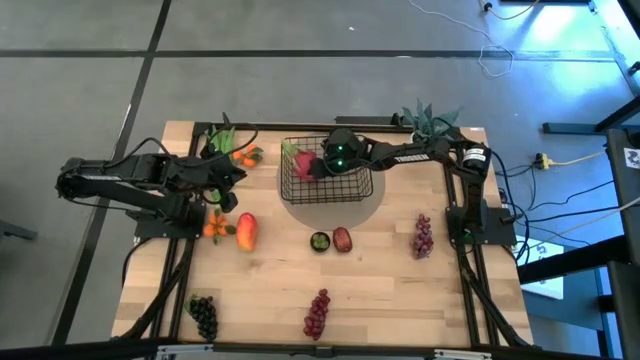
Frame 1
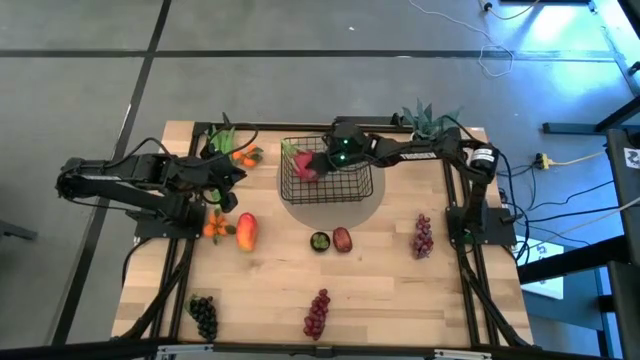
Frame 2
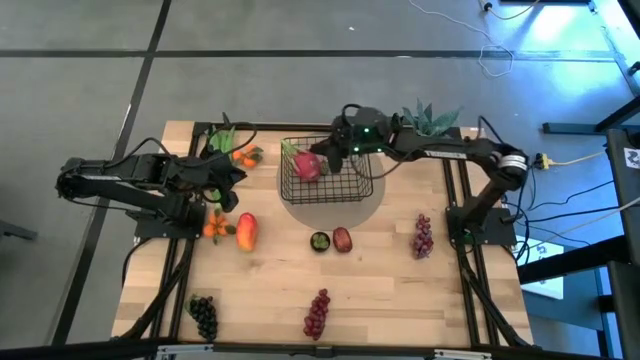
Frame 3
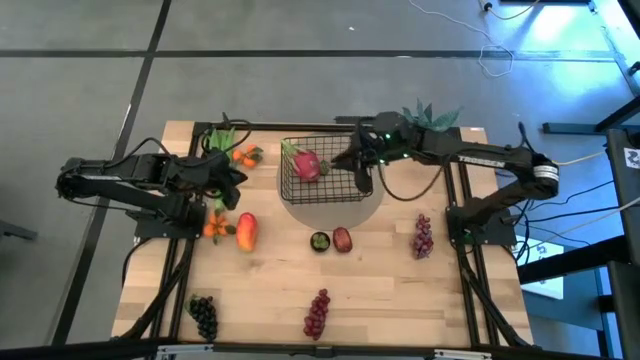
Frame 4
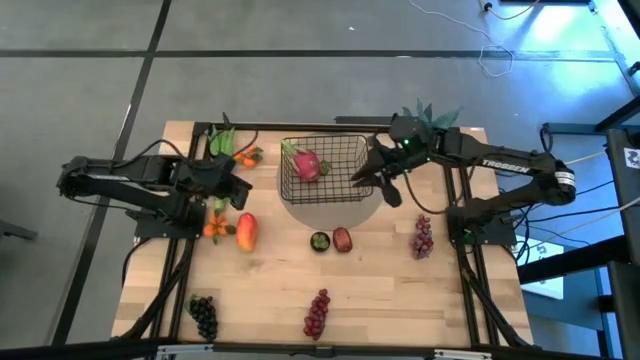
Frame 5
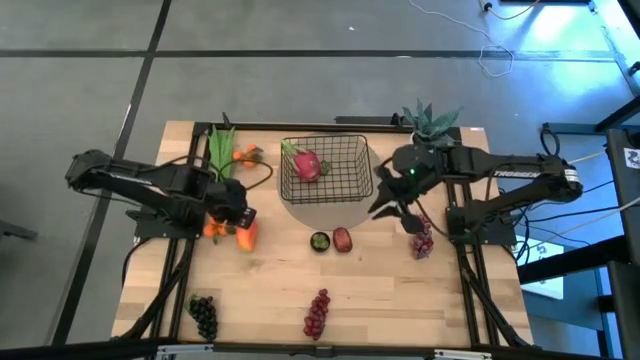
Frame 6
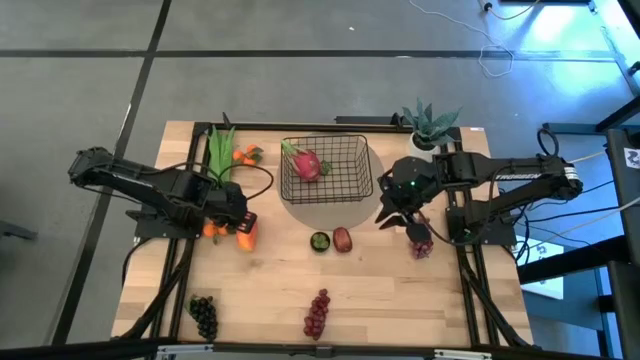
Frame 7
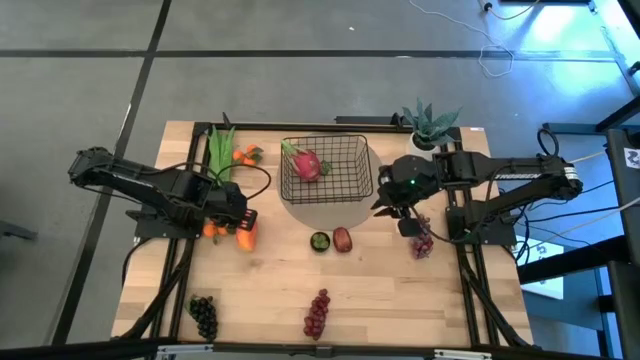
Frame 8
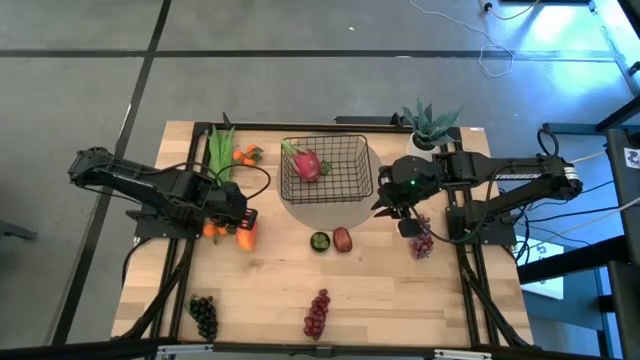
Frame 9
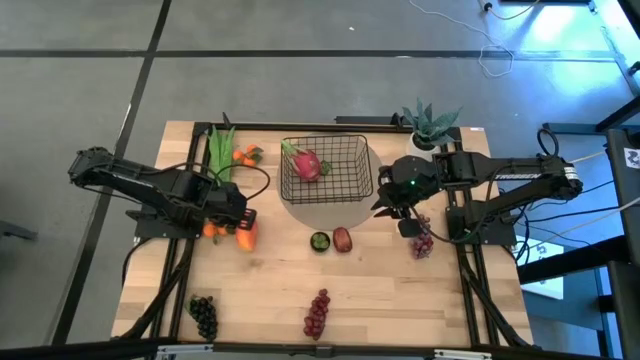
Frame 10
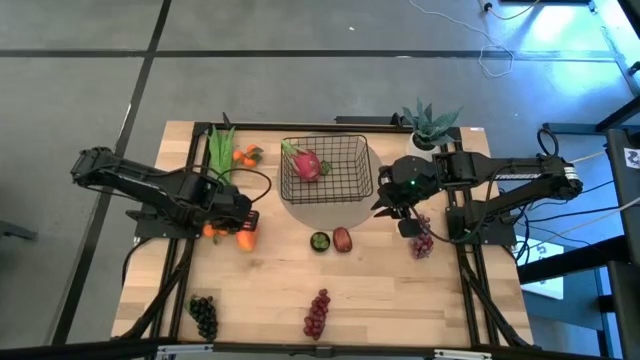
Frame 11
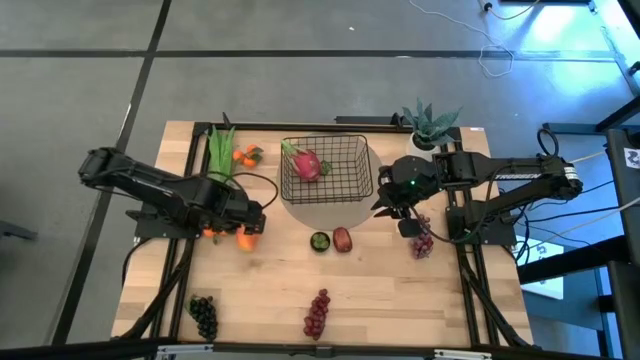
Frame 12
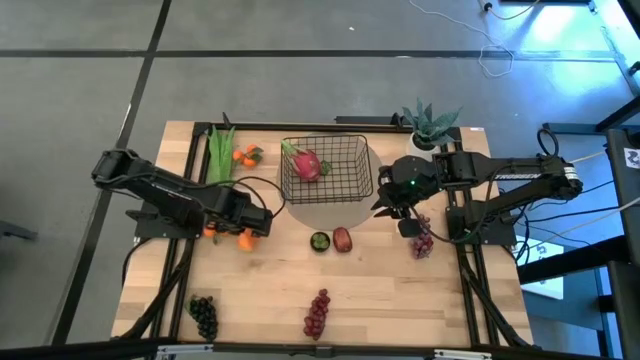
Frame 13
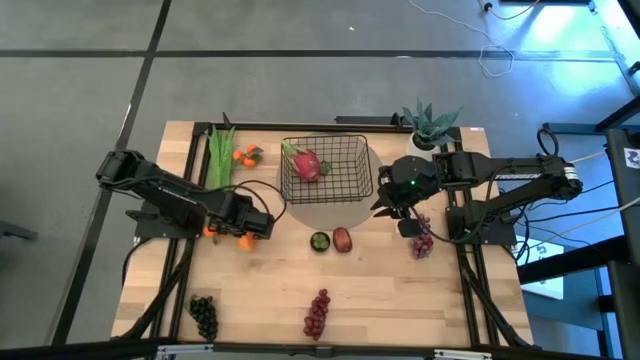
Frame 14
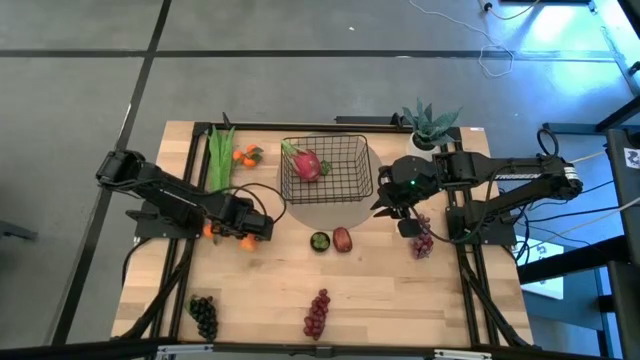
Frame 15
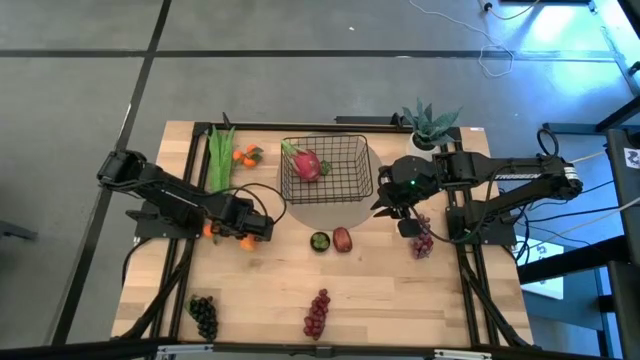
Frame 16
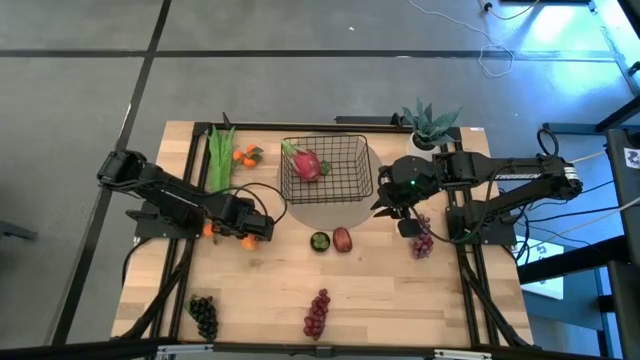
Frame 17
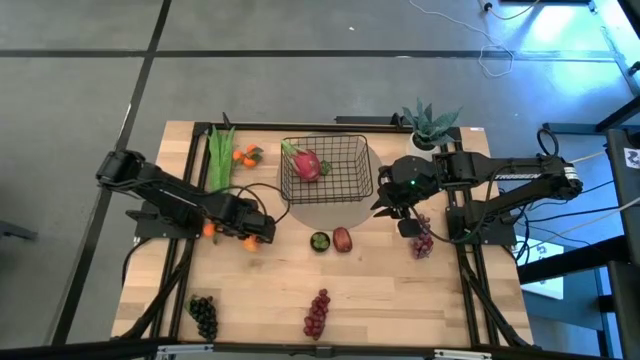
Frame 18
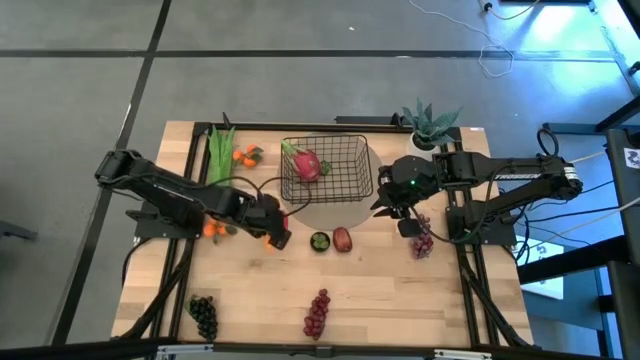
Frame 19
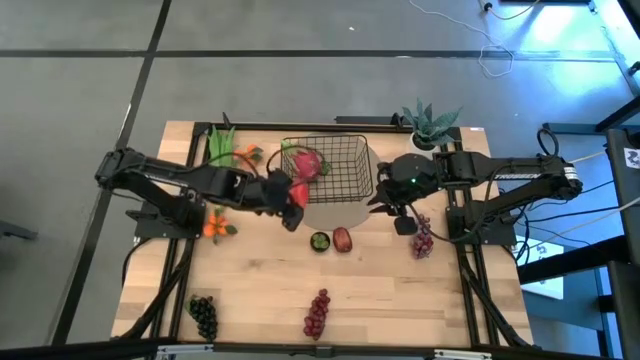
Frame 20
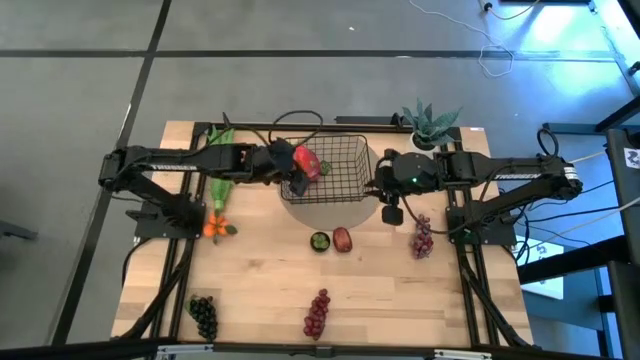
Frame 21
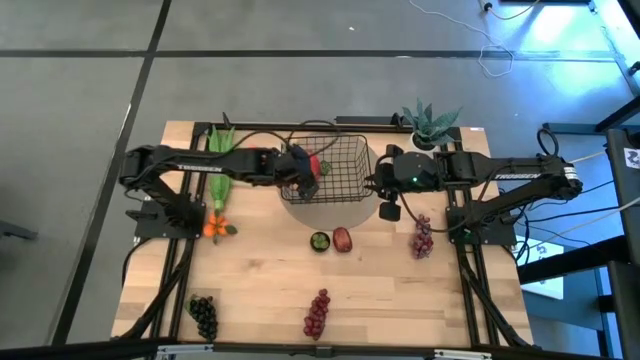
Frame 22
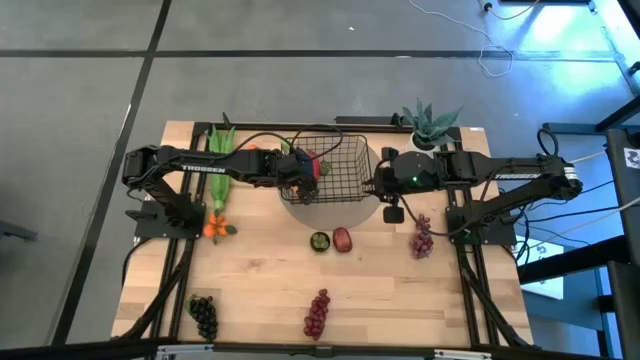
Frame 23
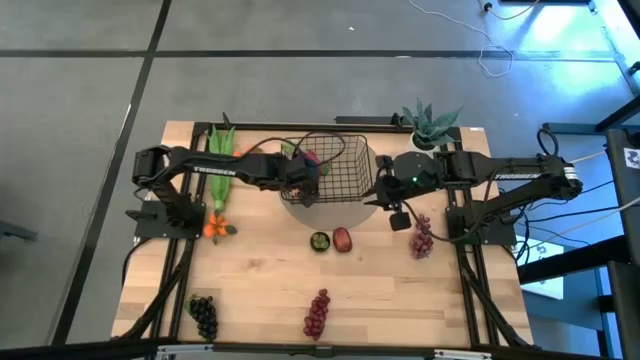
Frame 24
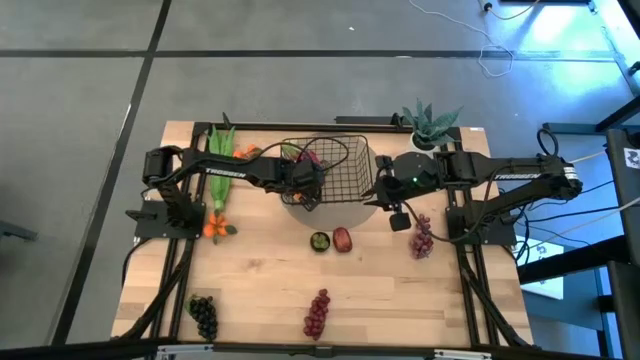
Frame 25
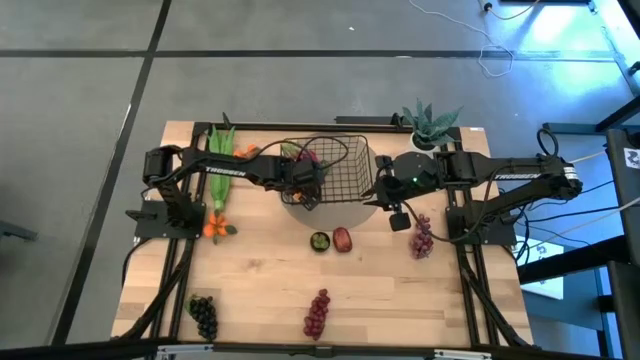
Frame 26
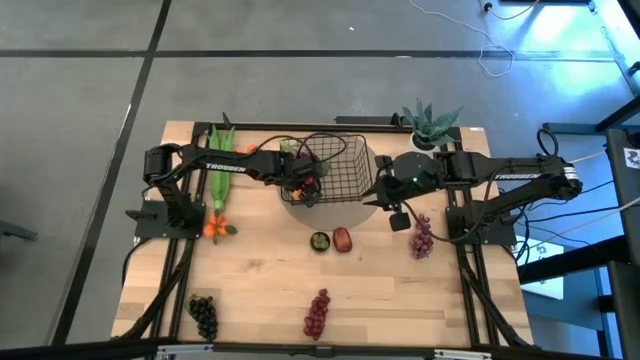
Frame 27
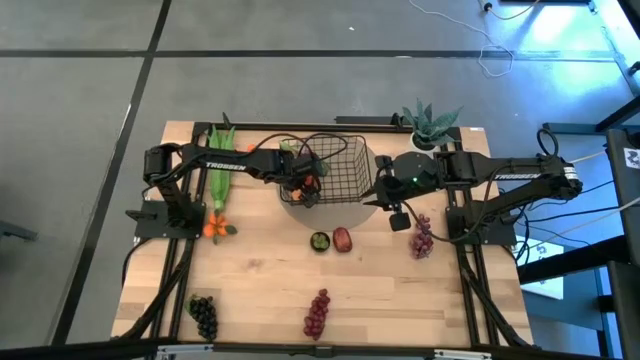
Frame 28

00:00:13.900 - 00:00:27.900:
Task: Build produce basket
Put the mango into the wire basket

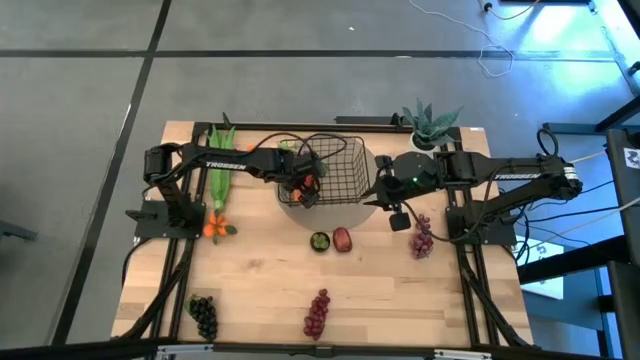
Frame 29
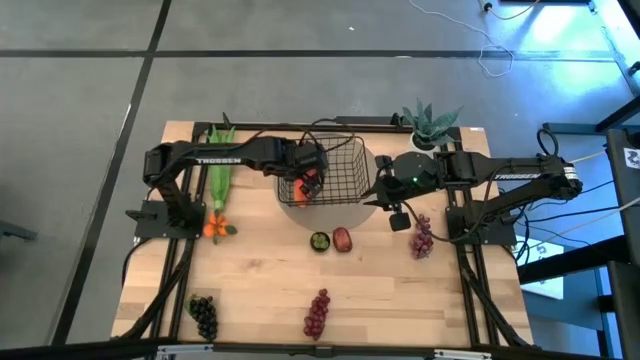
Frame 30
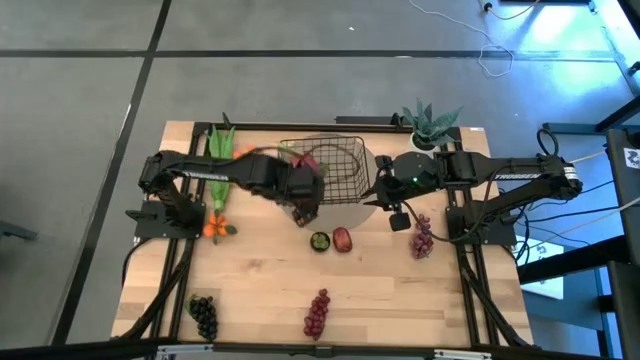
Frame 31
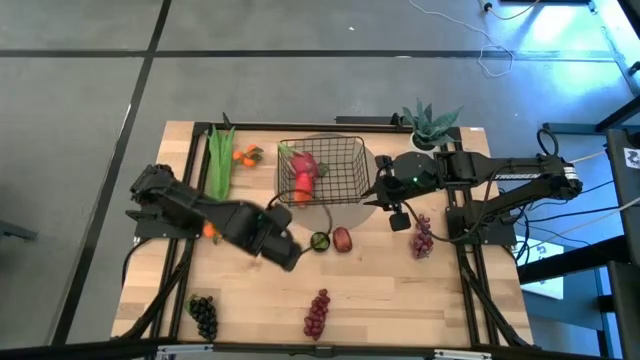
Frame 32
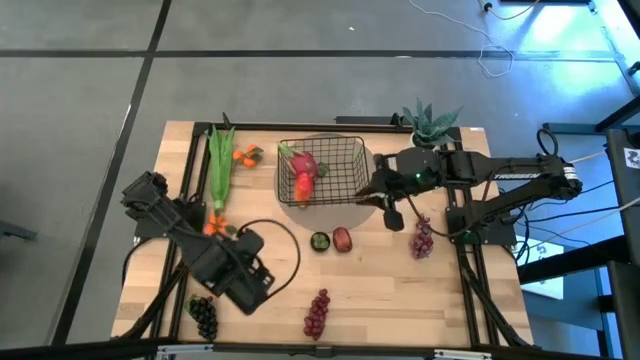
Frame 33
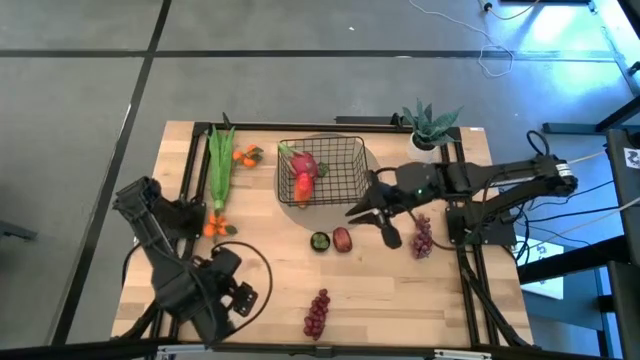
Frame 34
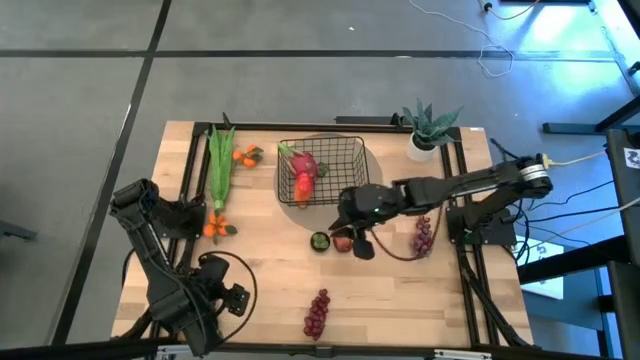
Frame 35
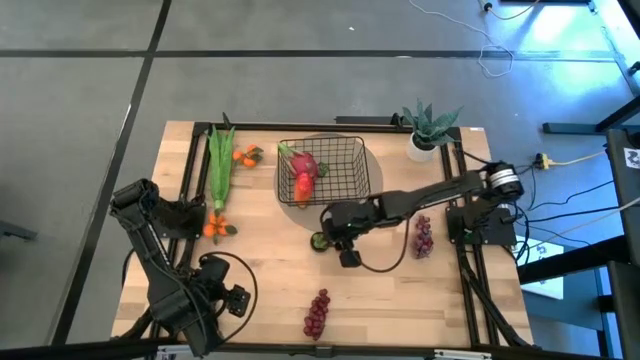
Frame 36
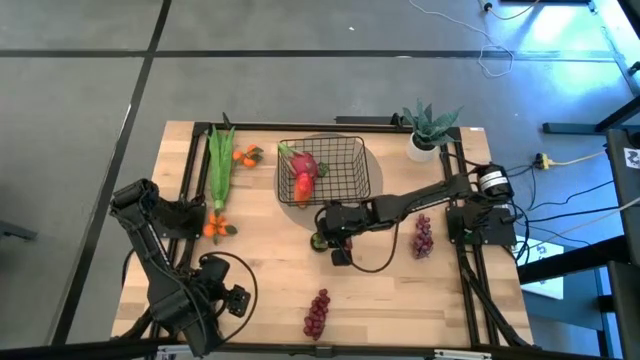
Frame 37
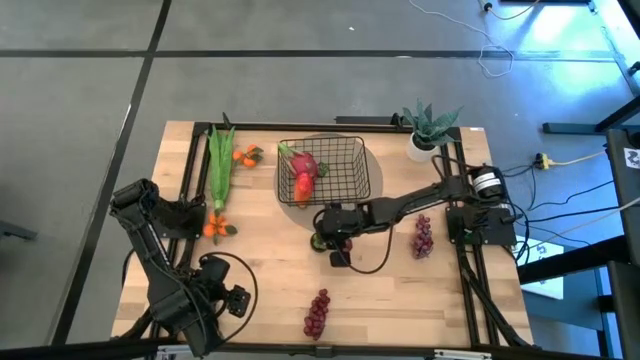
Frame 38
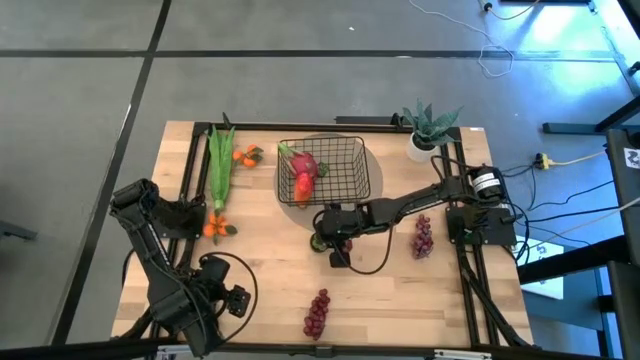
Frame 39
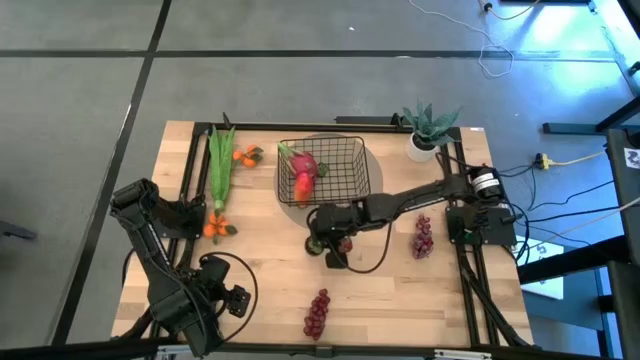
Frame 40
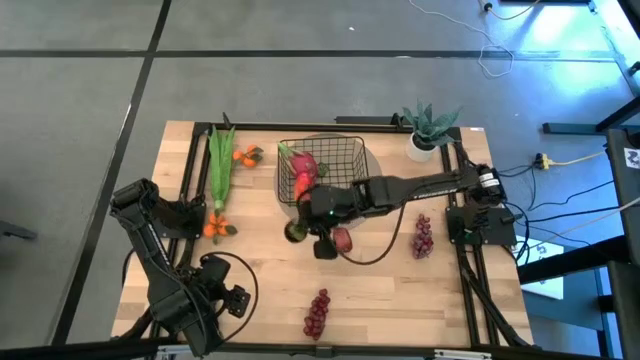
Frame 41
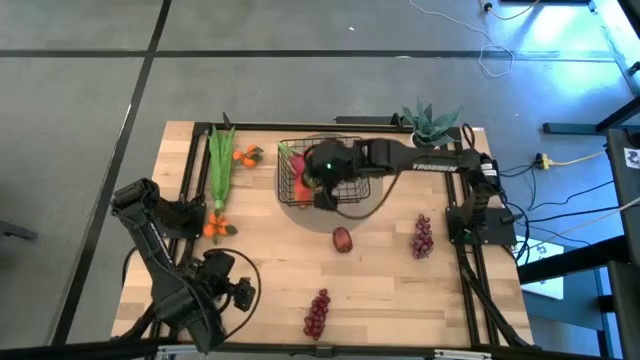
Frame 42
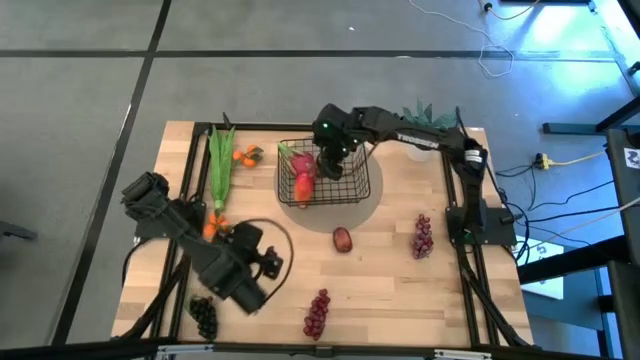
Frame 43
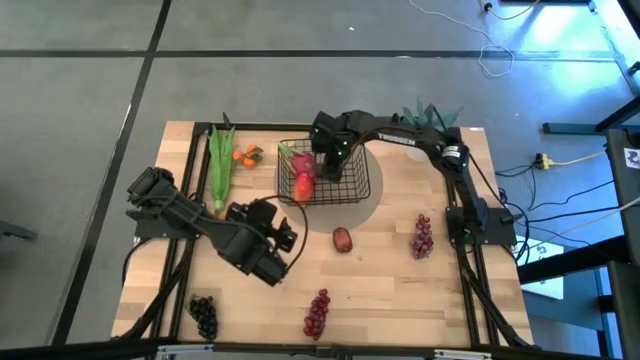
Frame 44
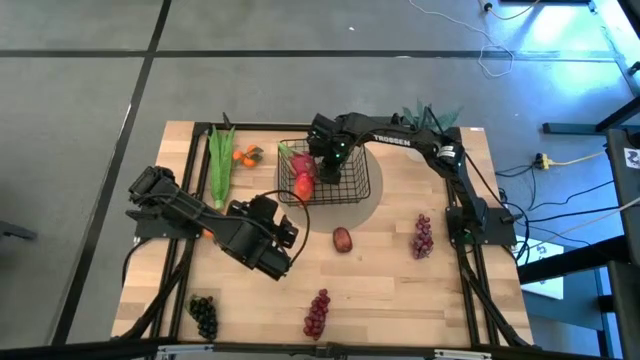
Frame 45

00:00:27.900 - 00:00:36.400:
Put the mangosteen into the wire basket
